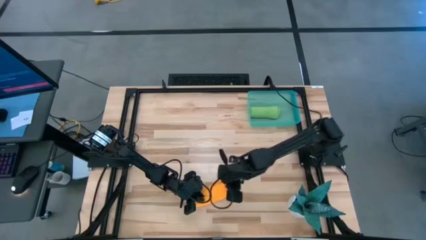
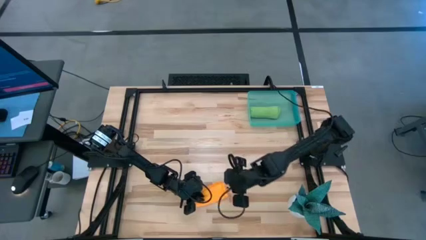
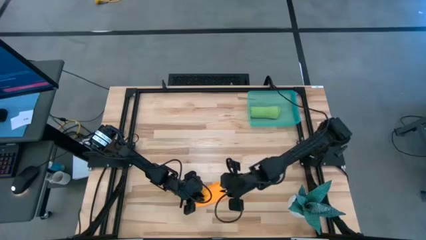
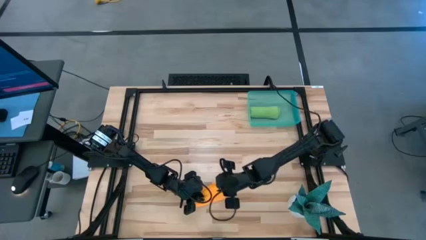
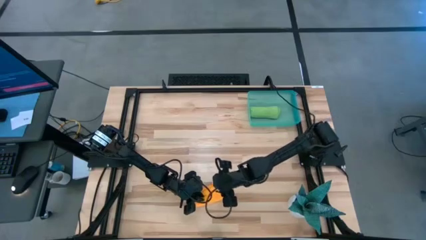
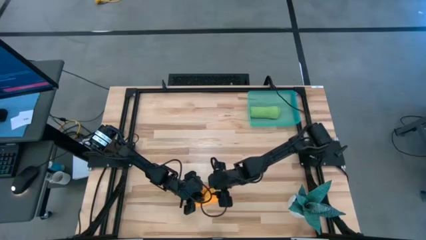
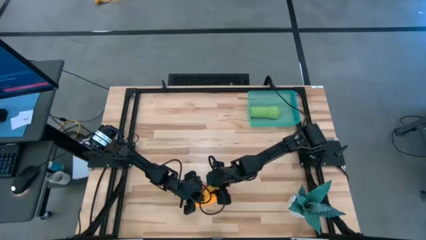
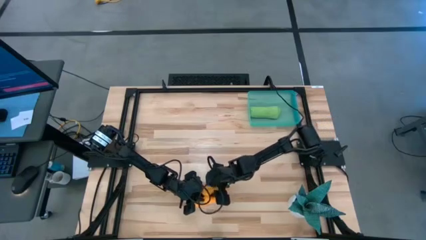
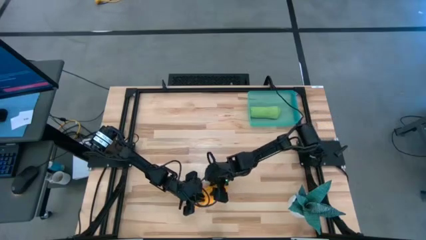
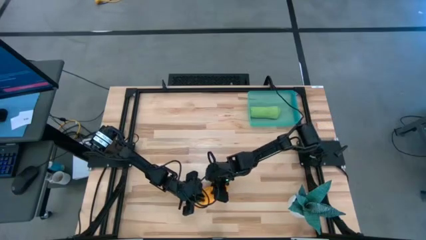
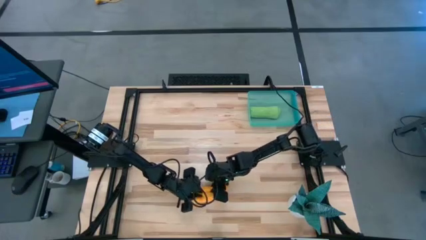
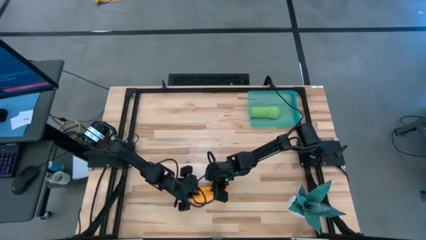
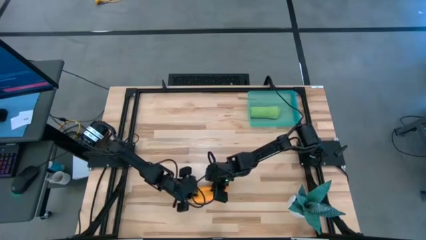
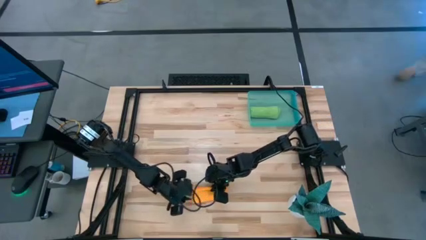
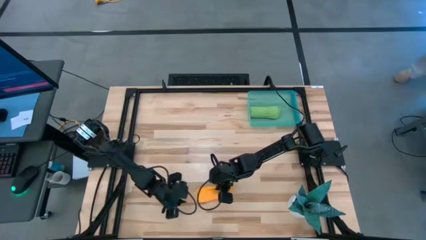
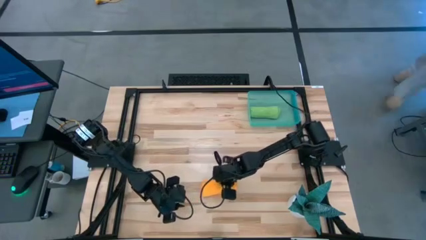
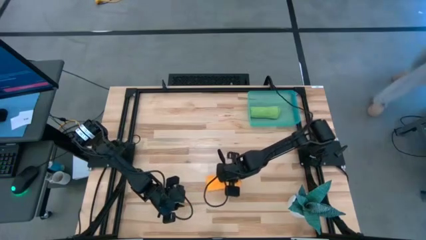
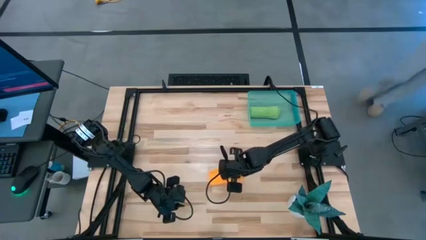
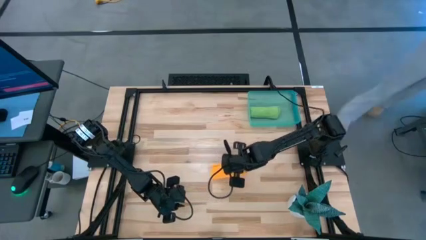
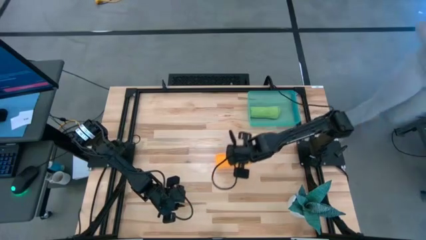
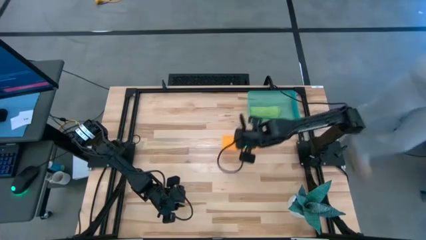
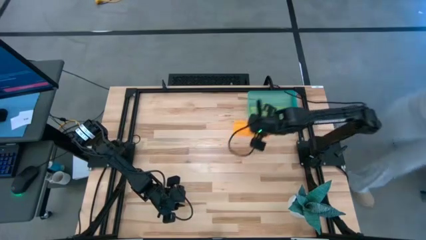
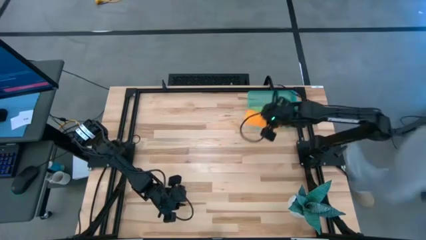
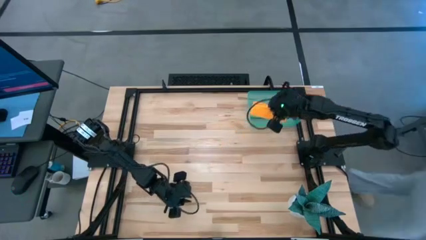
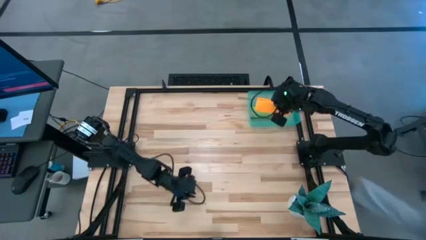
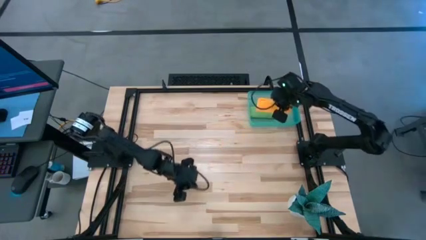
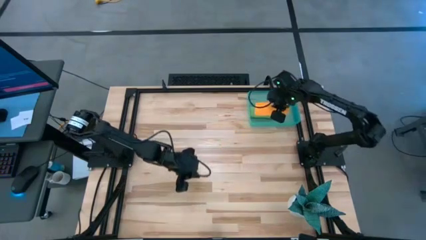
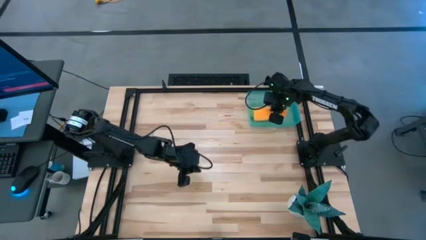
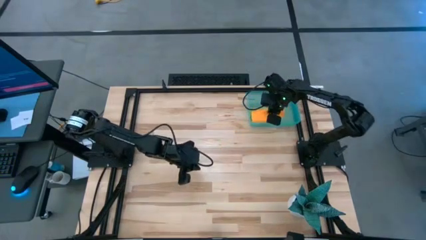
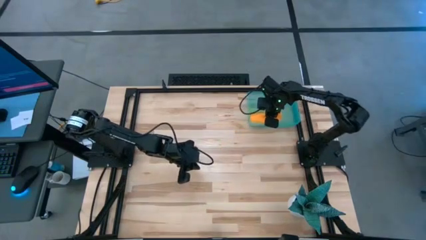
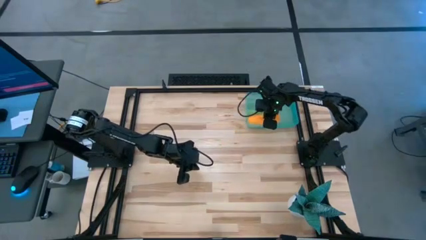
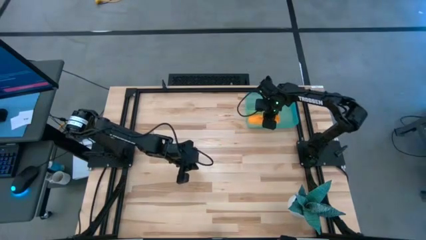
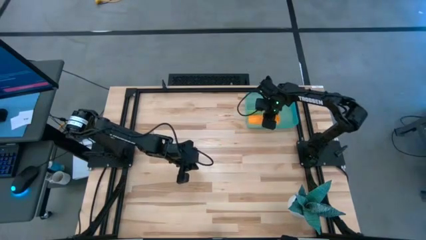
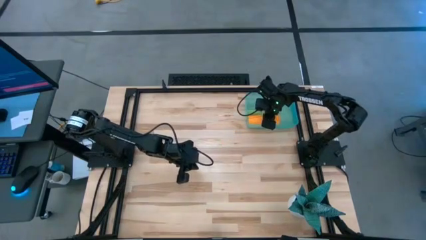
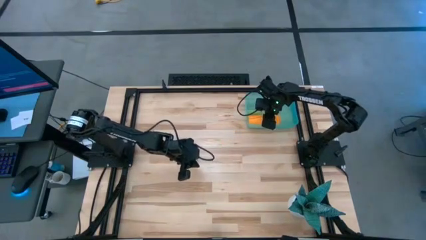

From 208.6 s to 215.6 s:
Task: Roll microfiber towels into tight, uniform cylinder then place into a basket
Put the orange microfiber towel into the blue bin

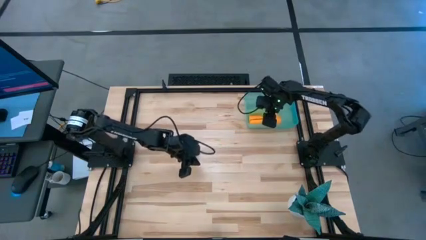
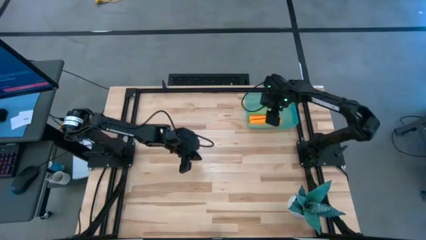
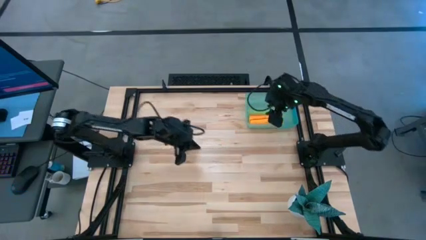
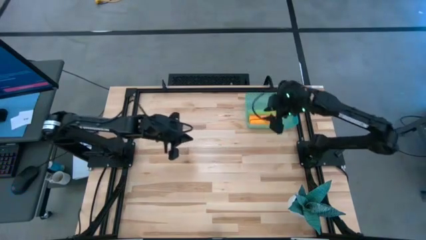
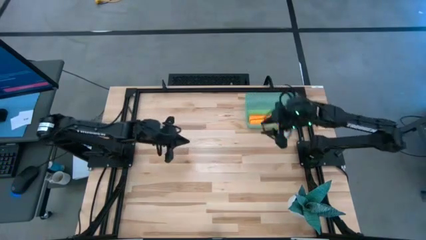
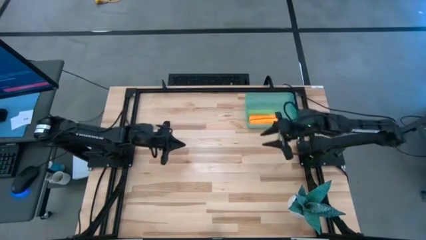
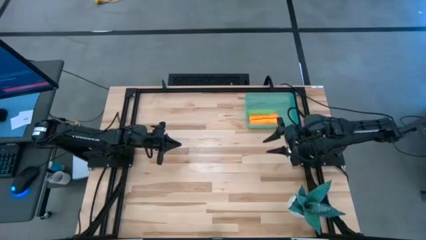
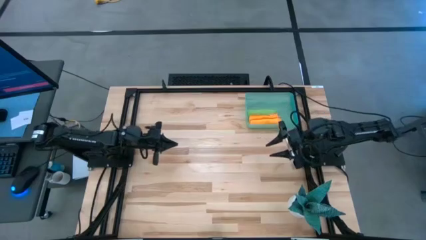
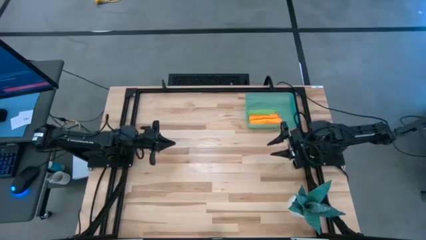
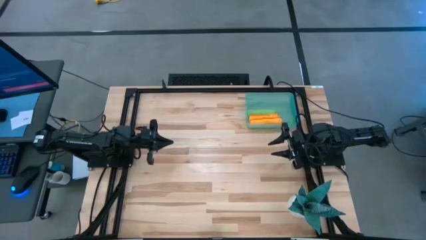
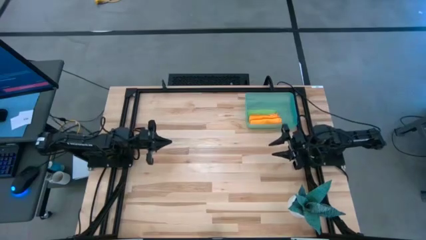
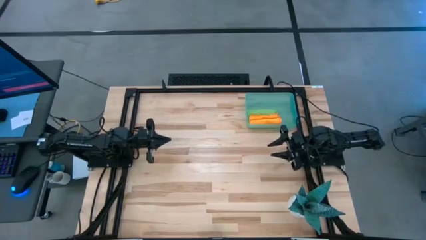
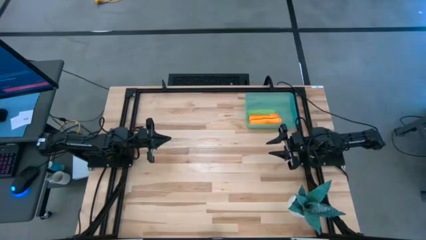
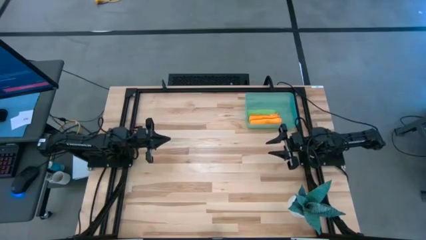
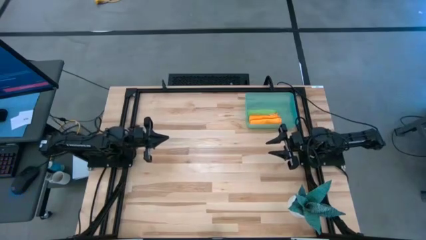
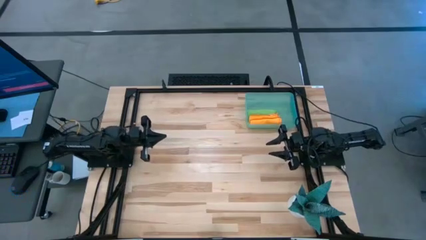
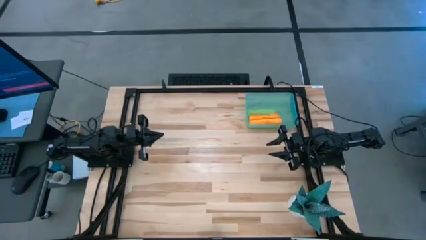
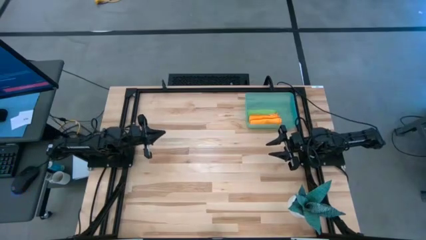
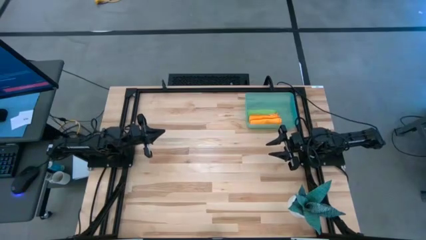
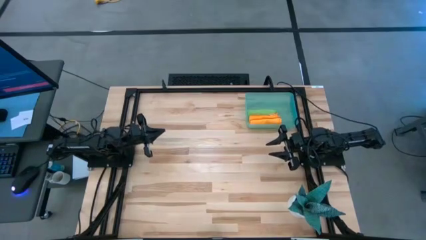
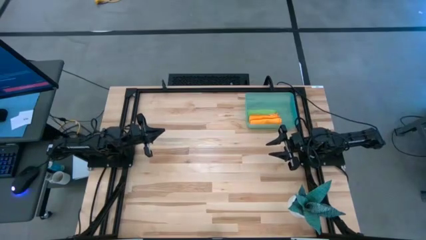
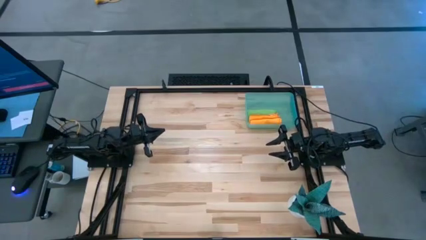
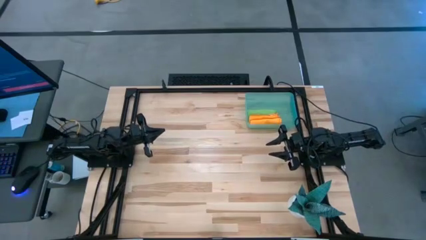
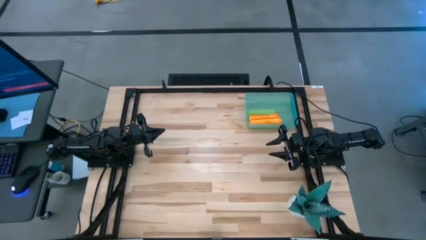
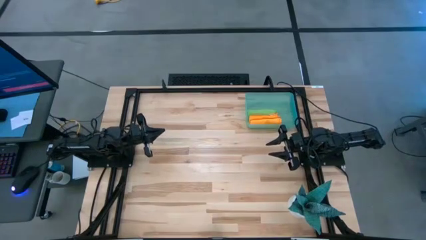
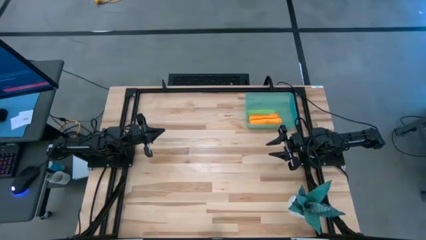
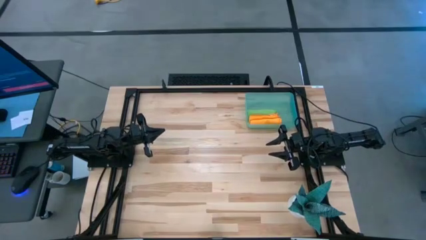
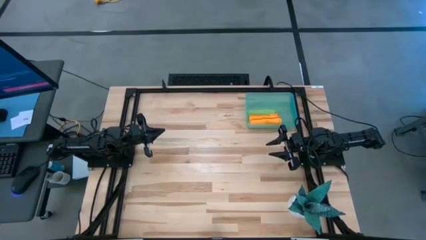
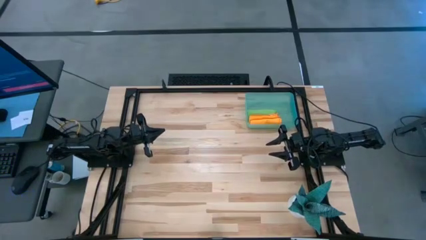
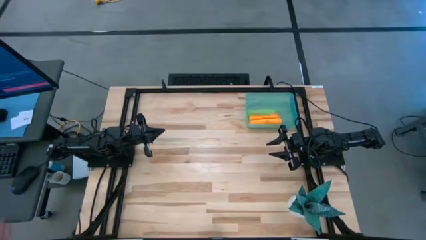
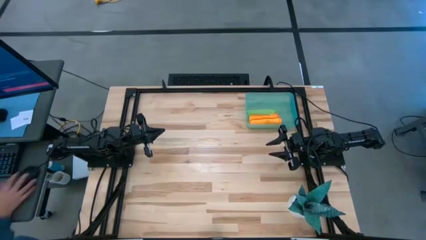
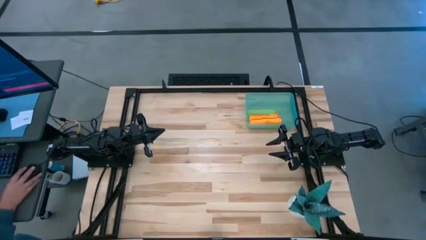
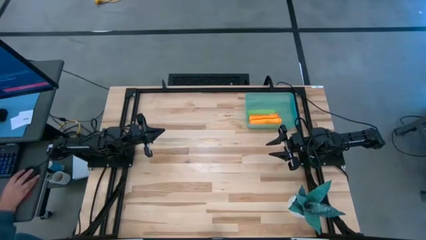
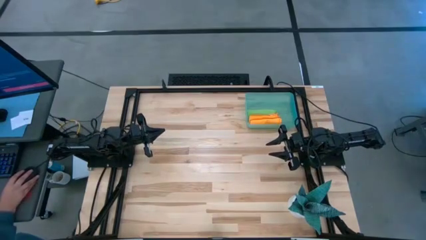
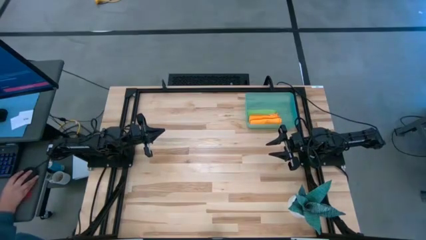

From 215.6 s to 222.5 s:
Return to Home Position
